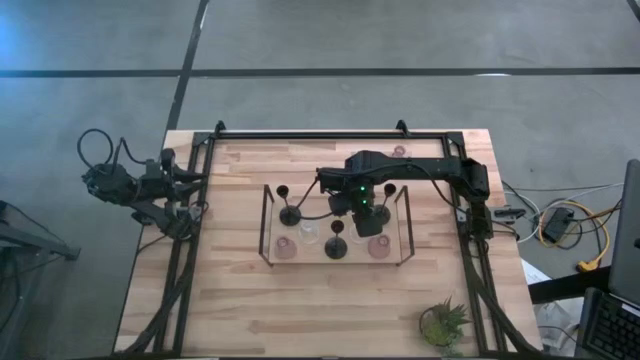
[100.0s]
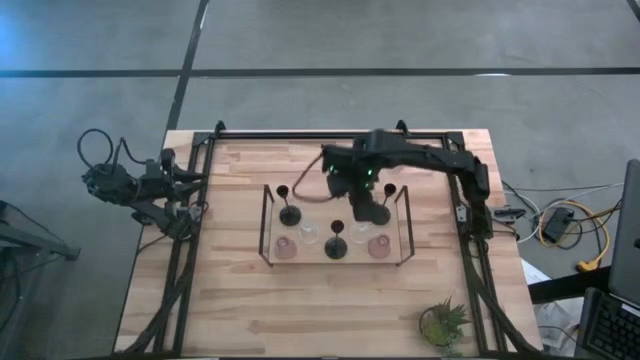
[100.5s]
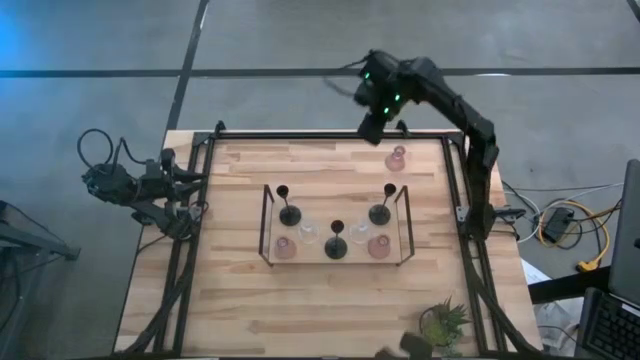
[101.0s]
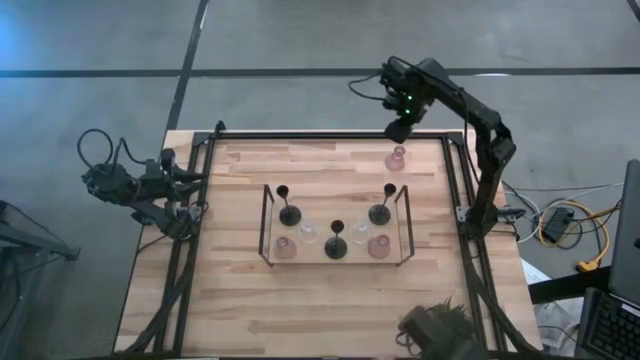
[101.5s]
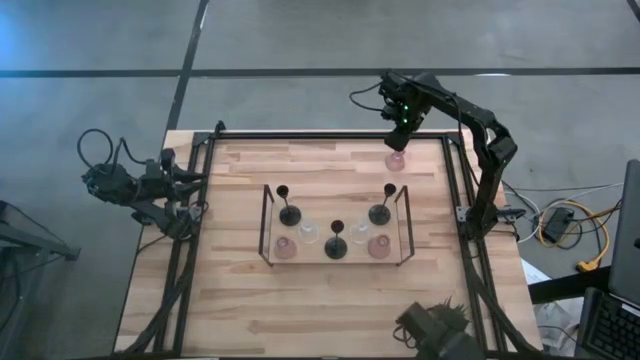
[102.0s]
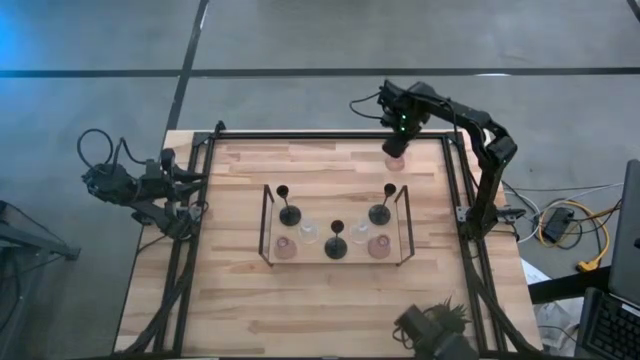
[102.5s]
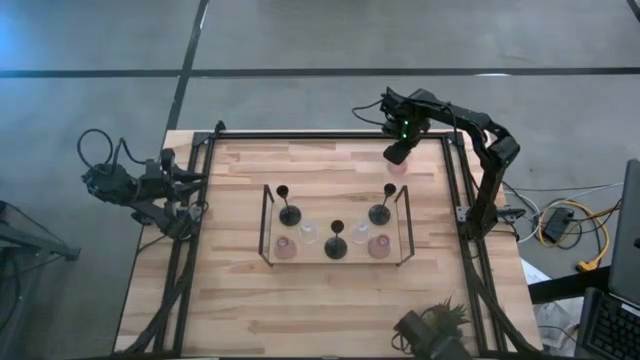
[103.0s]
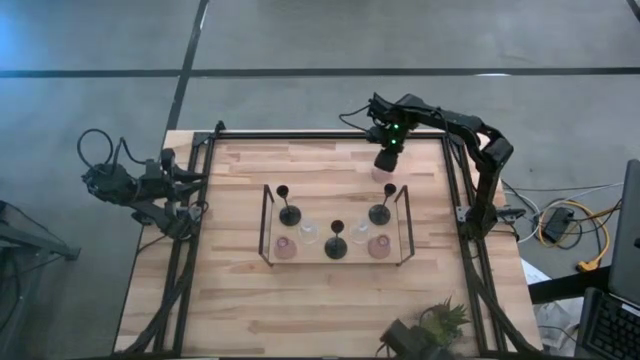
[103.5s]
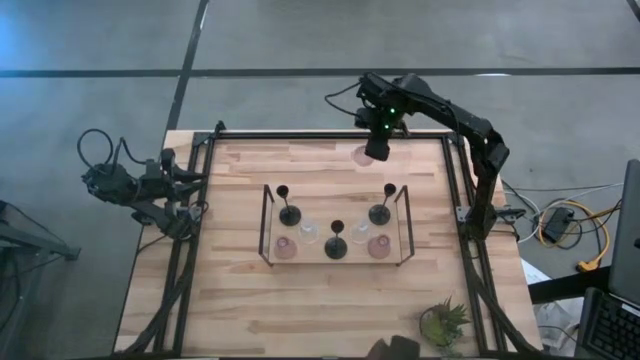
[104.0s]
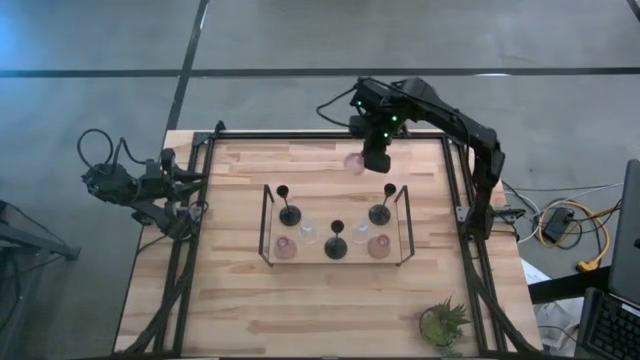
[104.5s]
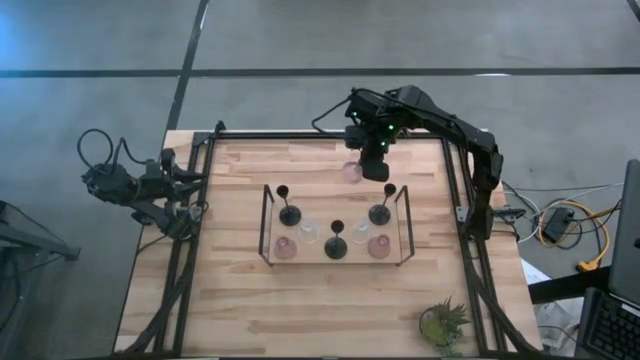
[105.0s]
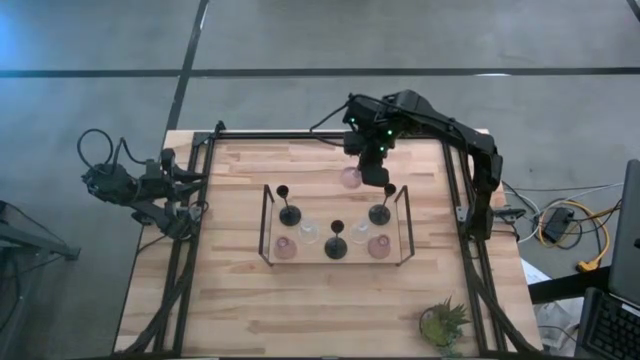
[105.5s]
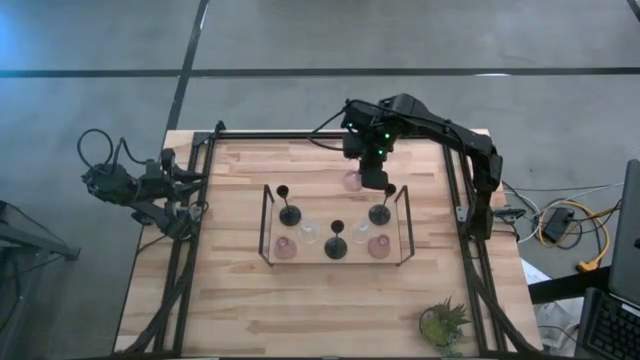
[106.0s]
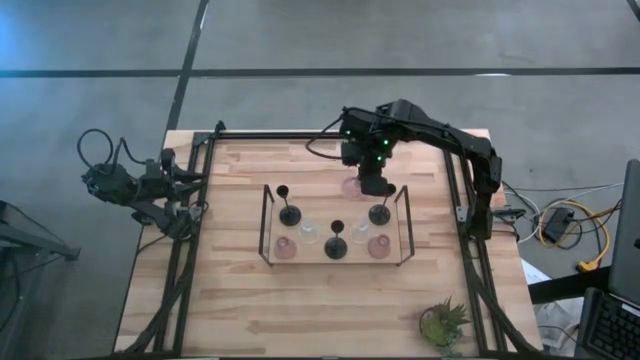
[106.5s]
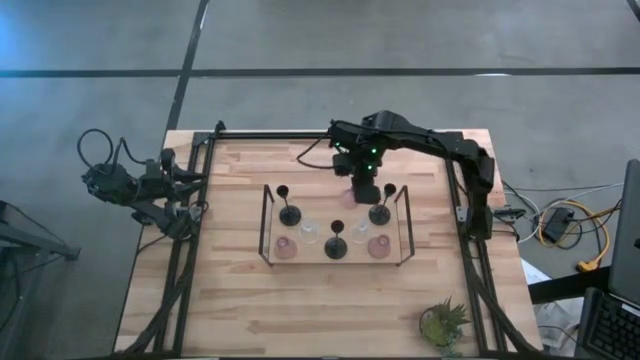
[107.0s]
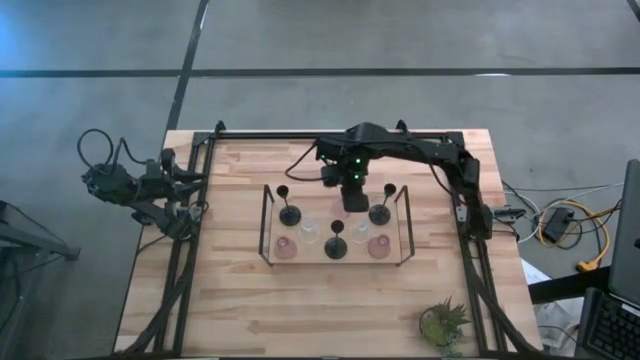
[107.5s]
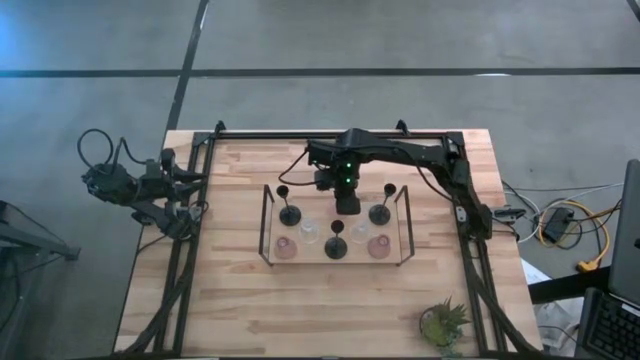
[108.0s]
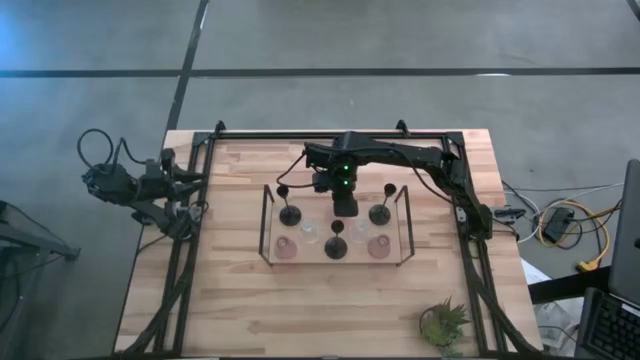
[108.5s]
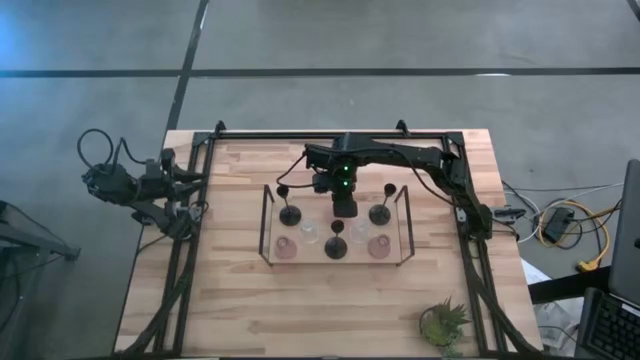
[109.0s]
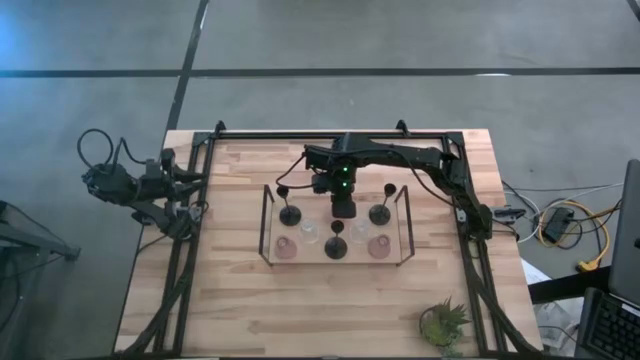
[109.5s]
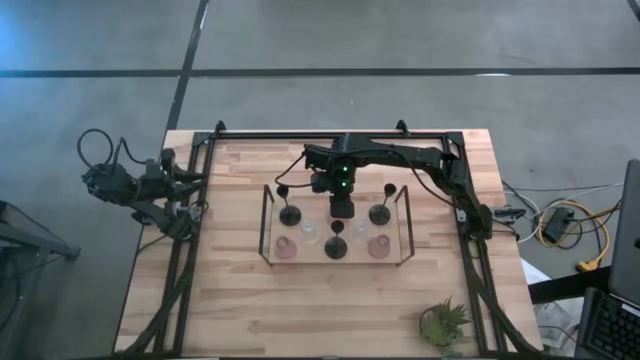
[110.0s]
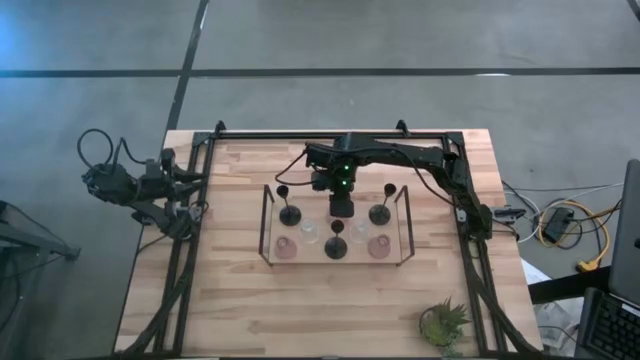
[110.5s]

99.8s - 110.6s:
Task: Pick & Place candle stick holders
Put the pink glass candle holder on the shelf

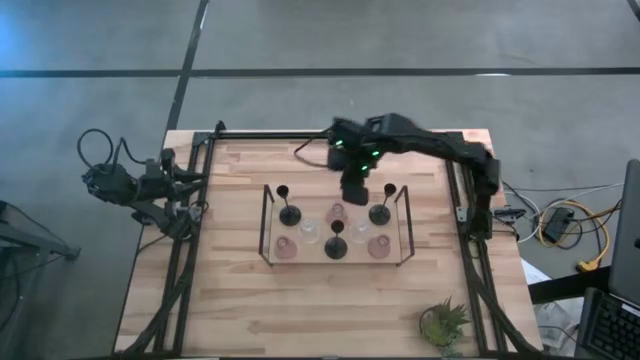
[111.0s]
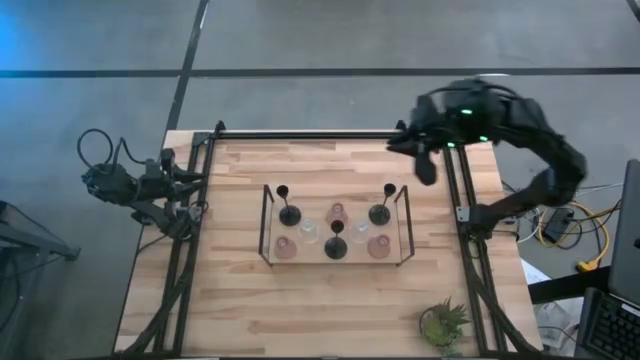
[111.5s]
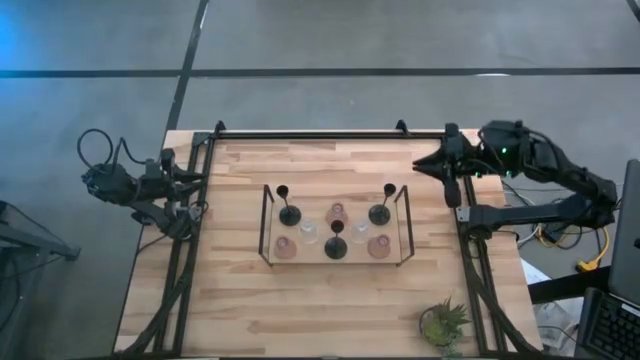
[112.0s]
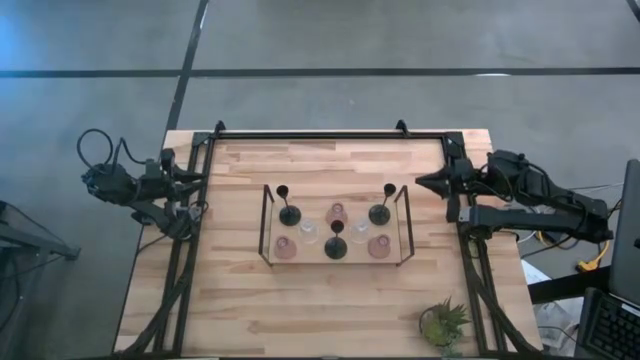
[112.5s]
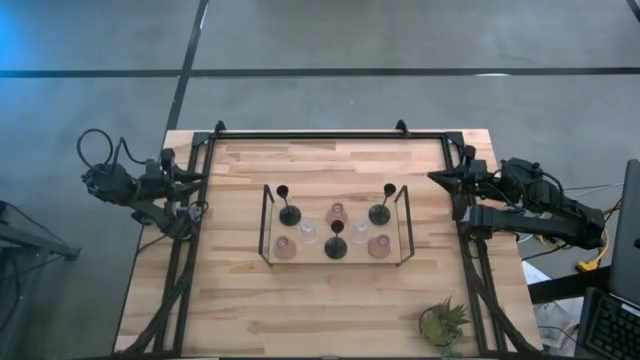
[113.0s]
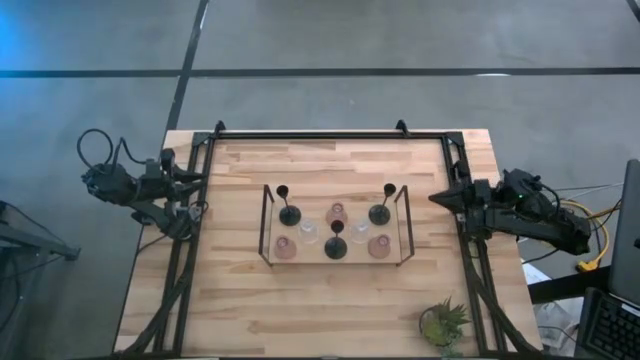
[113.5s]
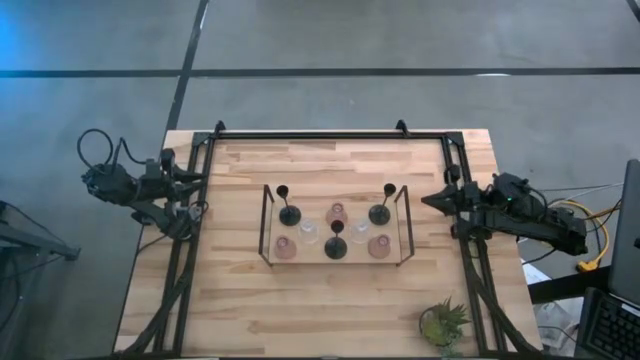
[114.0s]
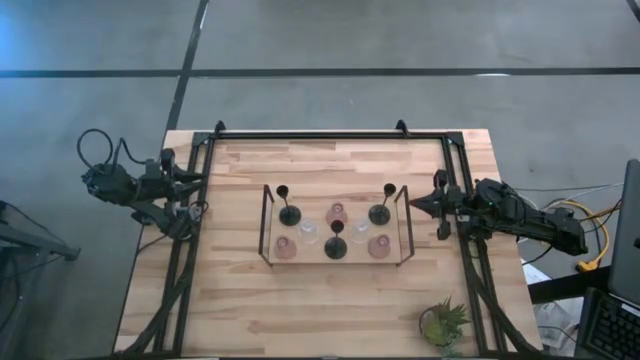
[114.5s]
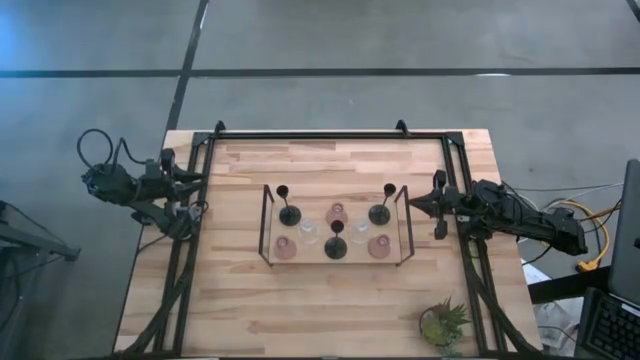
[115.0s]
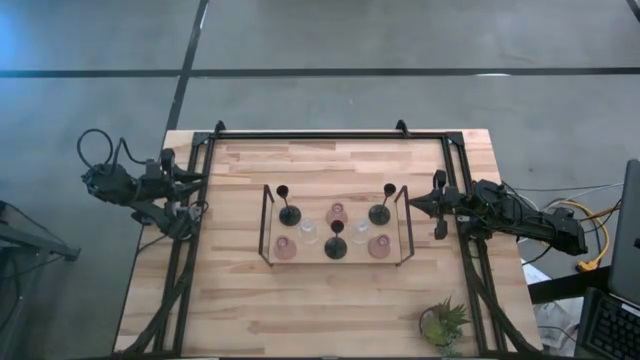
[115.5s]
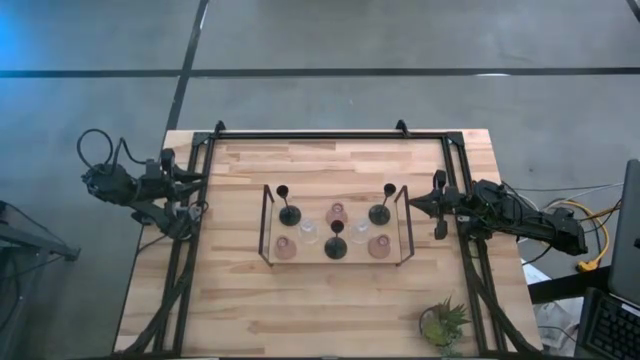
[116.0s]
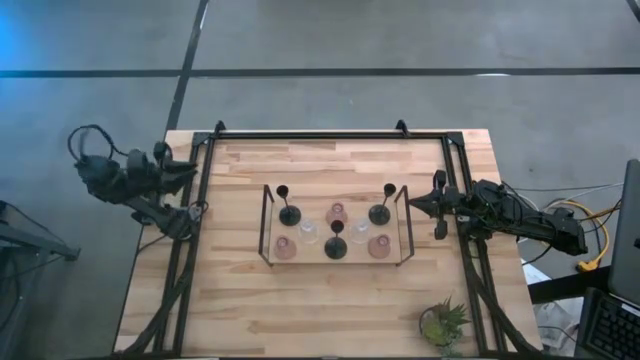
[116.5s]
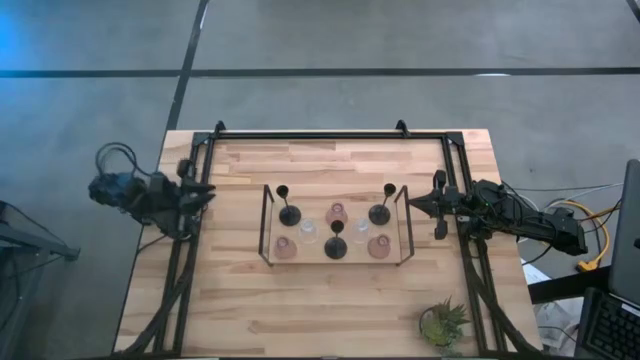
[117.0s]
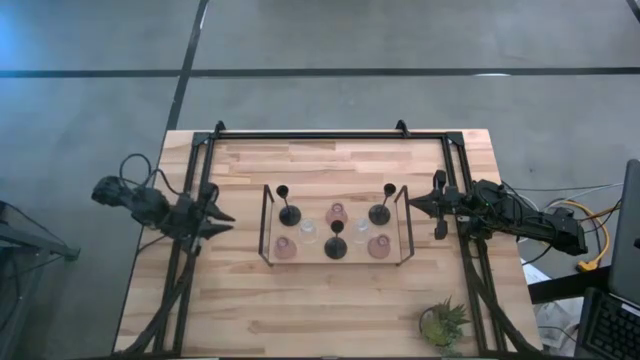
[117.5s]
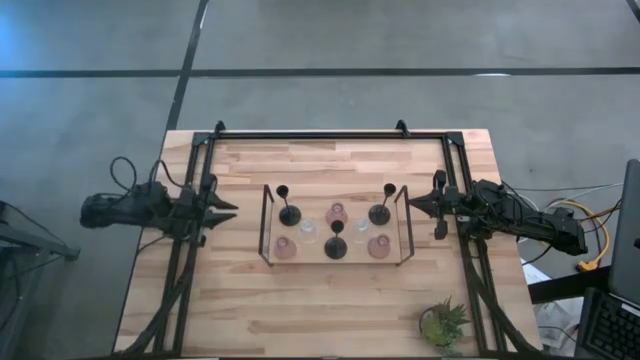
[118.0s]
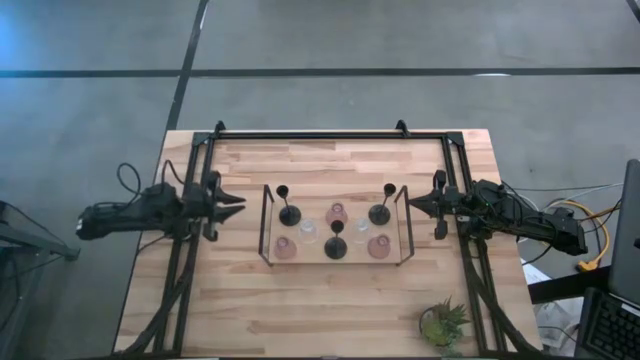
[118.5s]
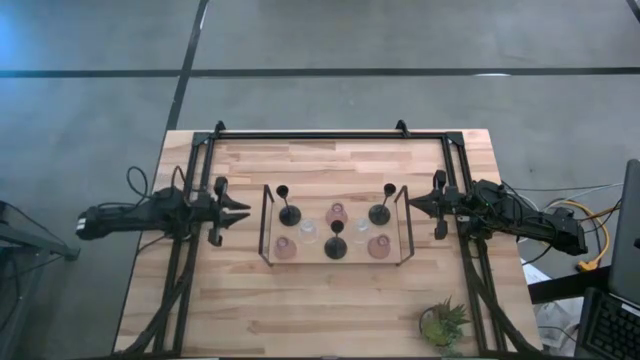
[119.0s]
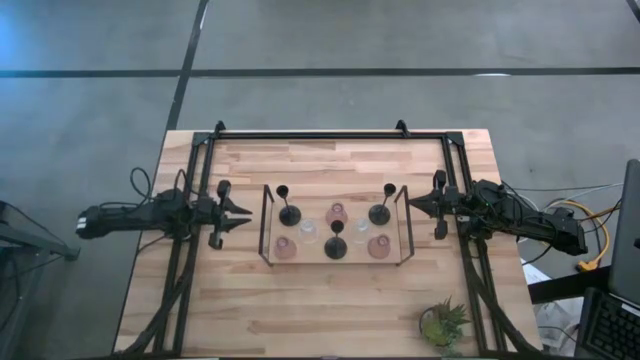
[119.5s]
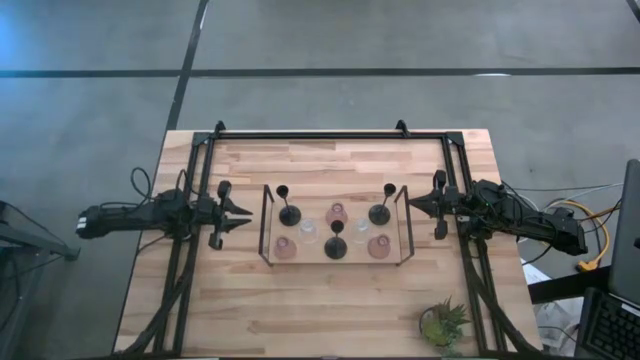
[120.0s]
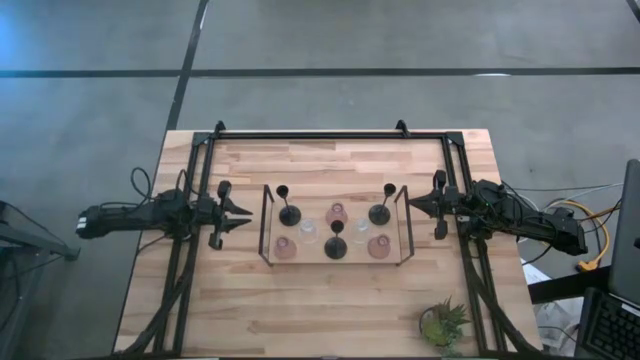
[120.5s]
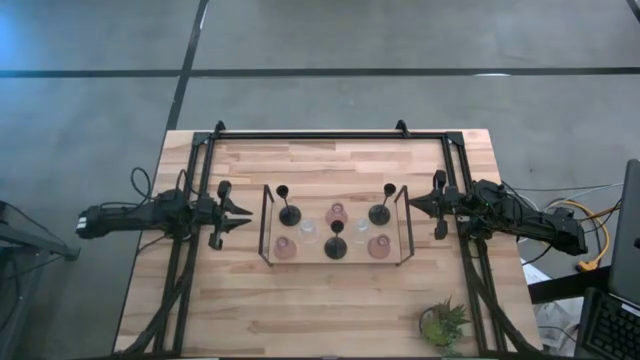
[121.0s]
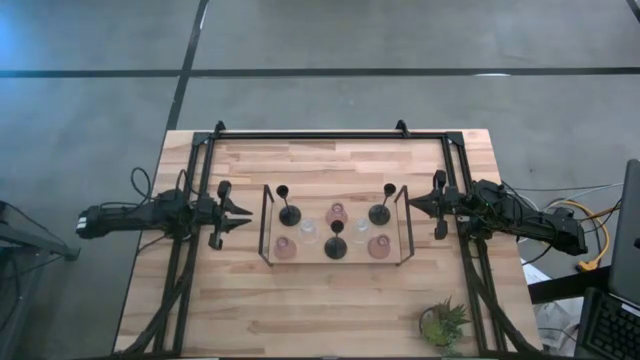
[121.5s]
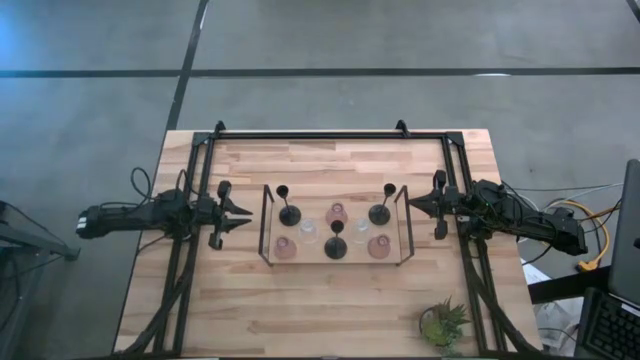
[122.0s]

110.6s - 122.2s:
Return to Home Position
